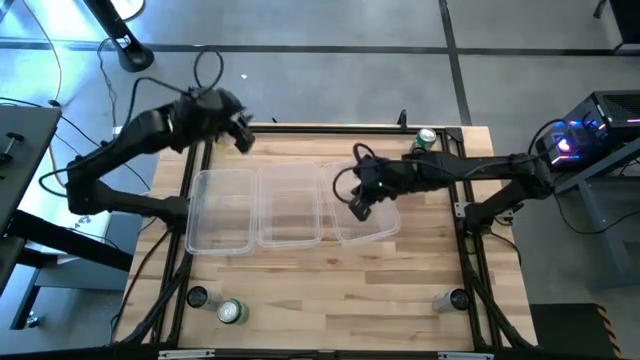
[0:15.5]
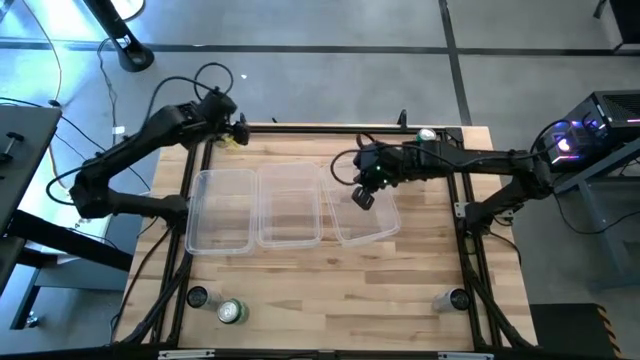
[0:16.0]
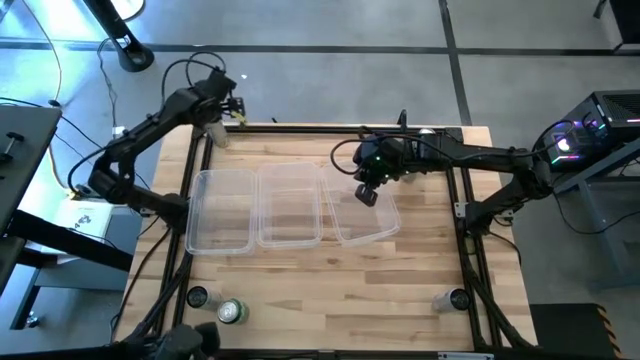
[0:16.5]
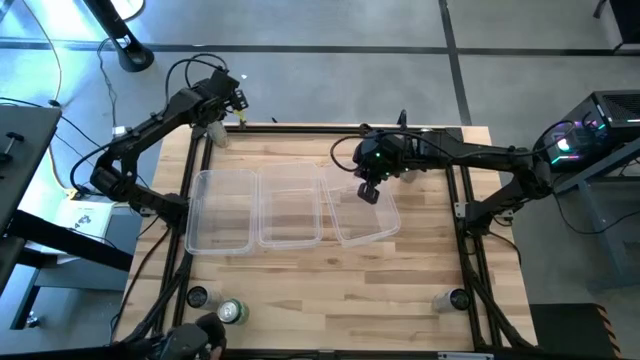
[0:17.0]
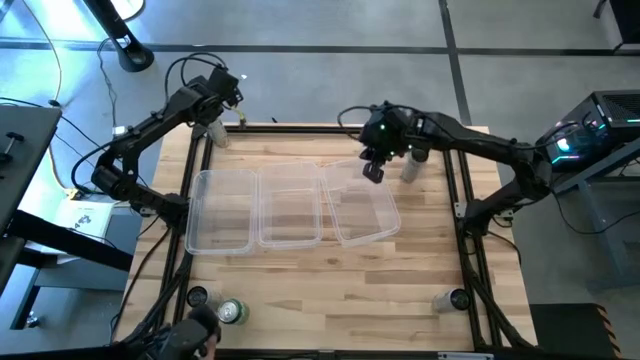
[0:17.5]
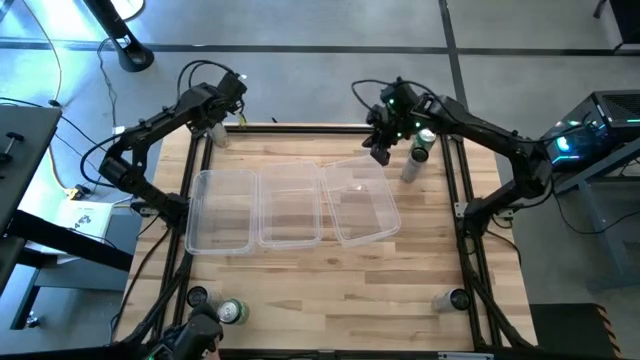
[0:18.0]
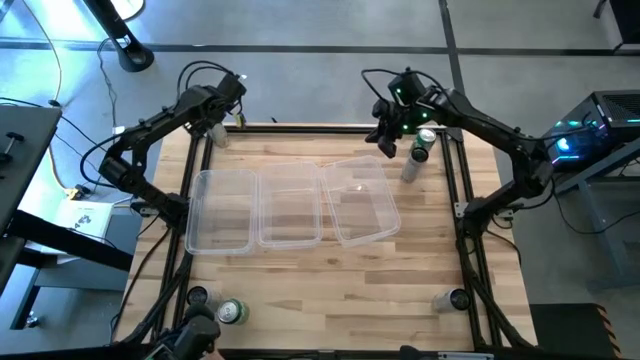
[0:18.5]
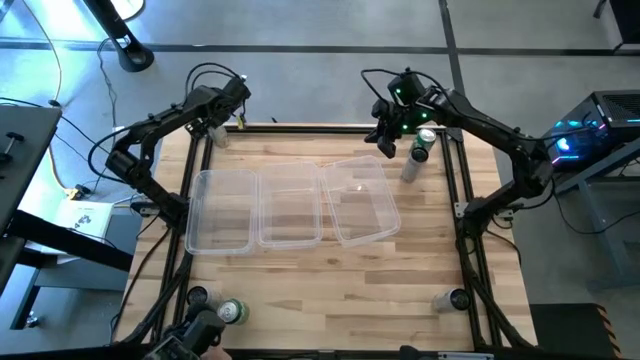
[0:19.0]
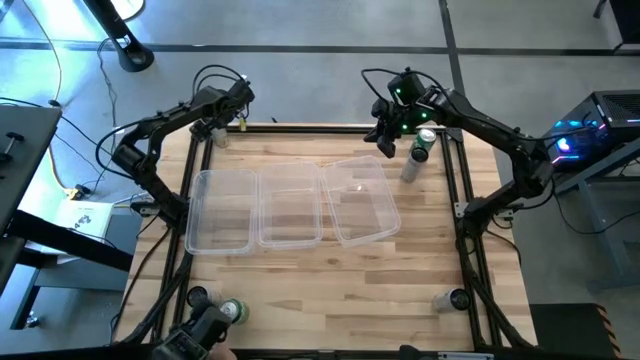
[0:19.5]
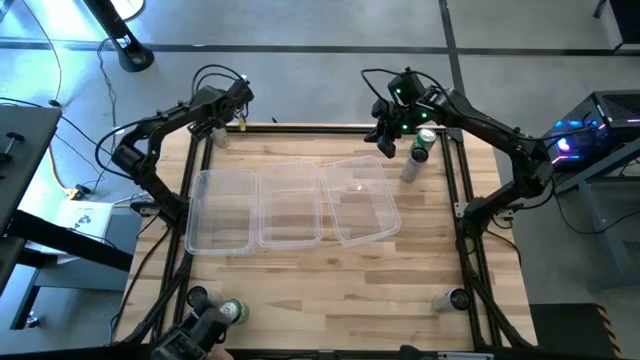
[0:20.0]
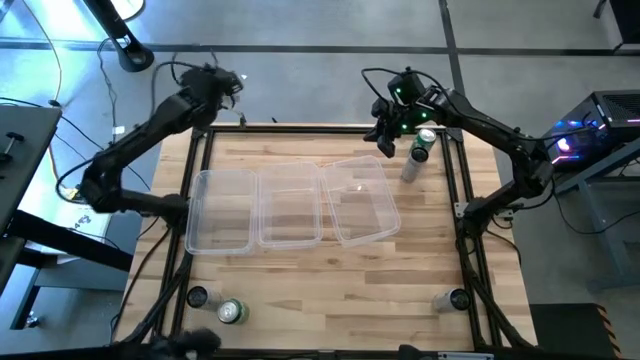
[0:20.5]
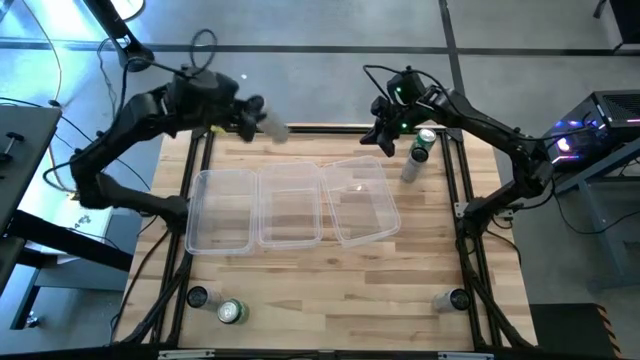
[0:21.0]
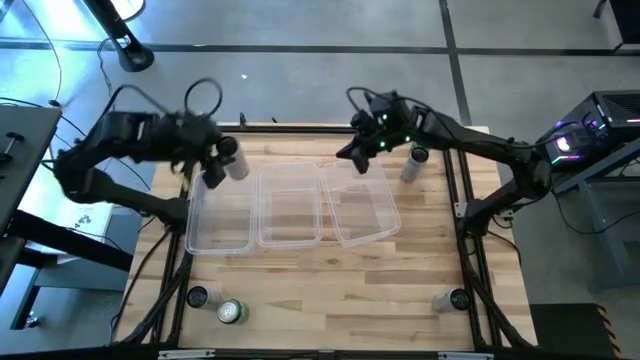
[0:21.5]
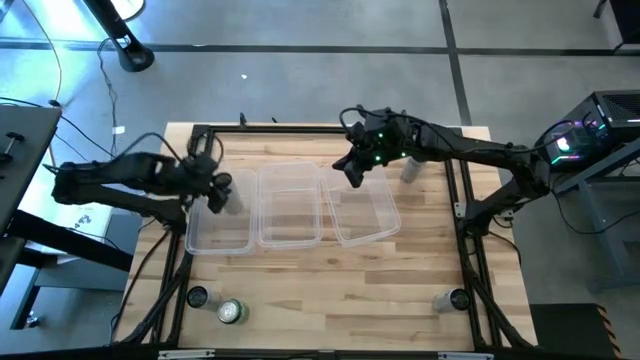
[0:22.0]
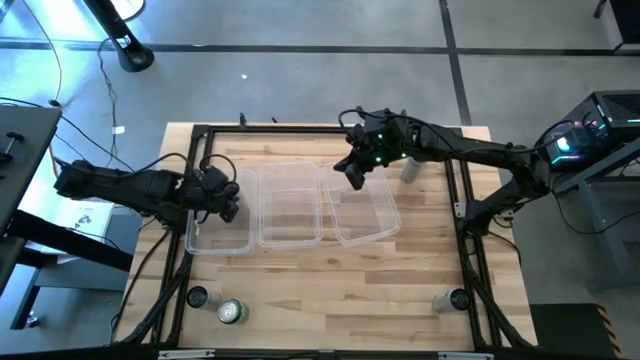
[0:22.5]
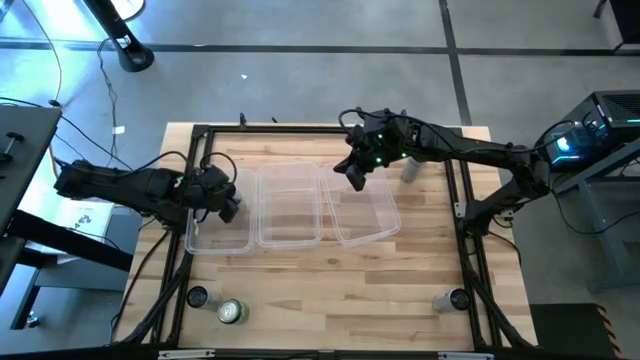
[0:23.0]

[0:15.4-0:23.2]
Task: Sort soda cans
Put the white-yellow can into the left transparent container

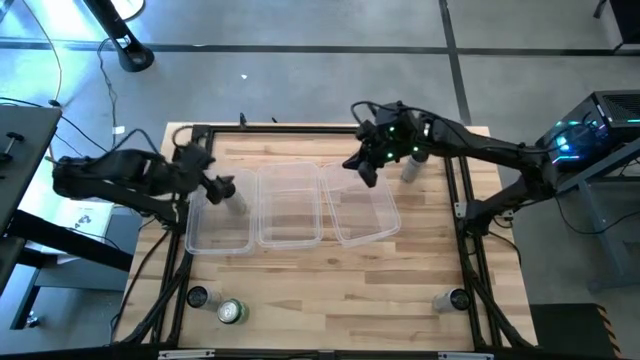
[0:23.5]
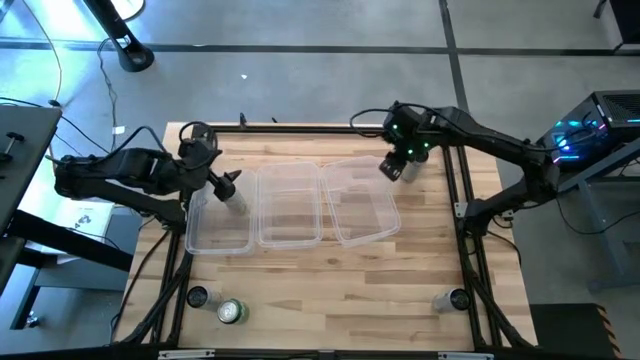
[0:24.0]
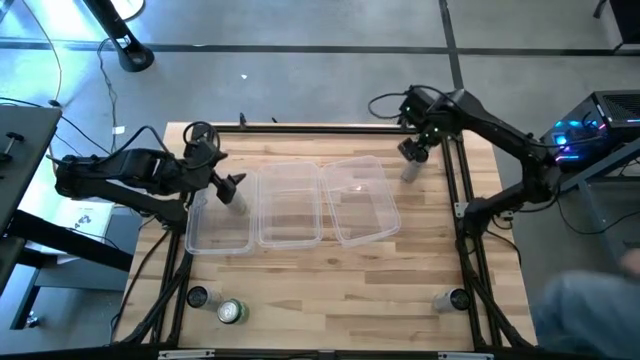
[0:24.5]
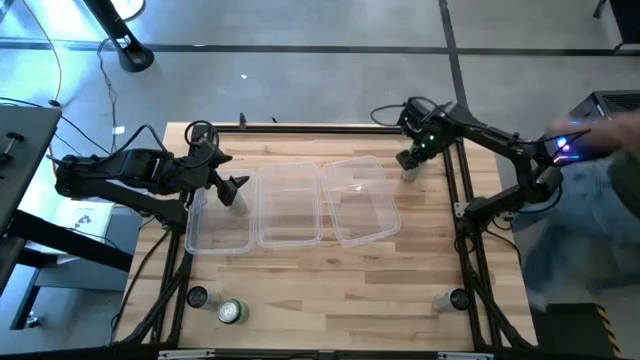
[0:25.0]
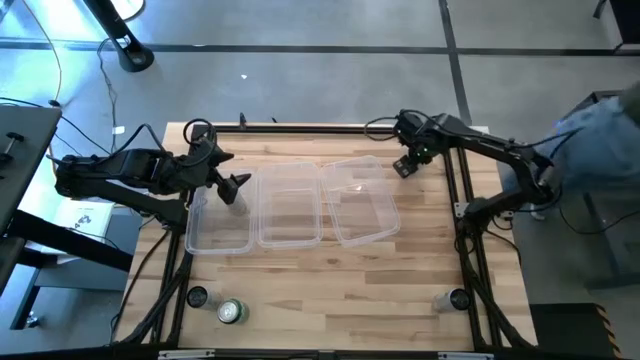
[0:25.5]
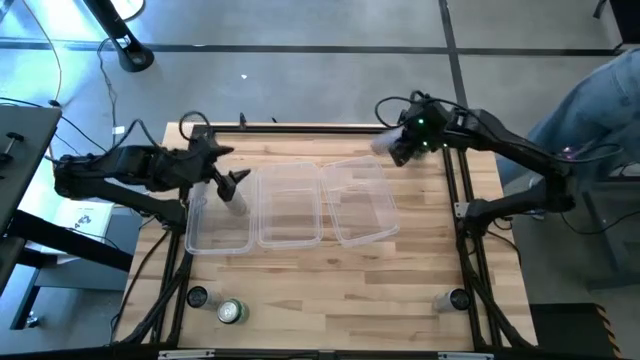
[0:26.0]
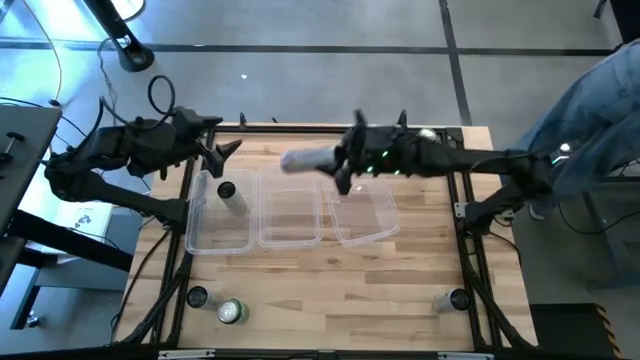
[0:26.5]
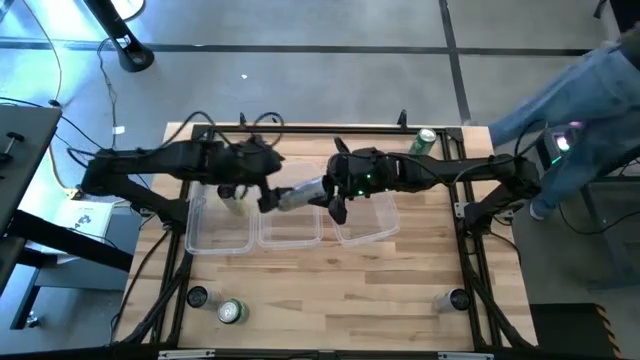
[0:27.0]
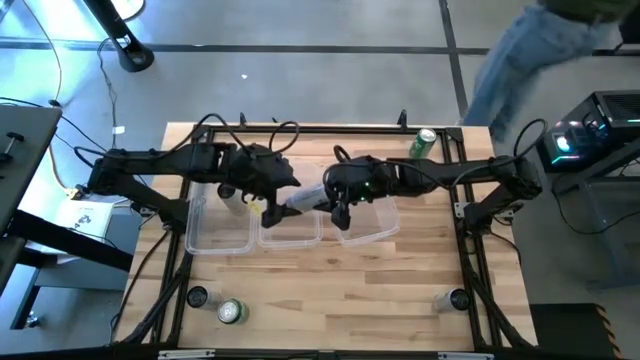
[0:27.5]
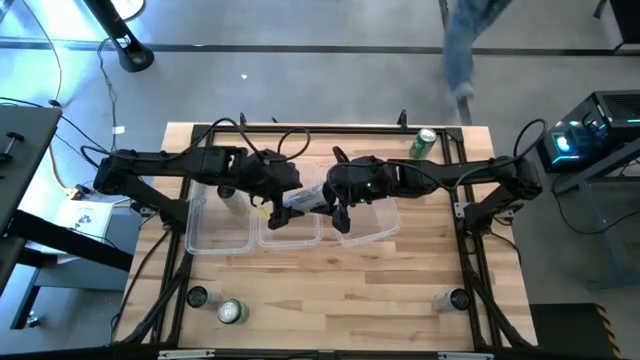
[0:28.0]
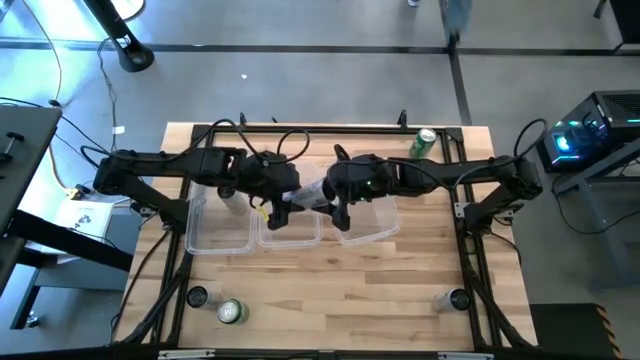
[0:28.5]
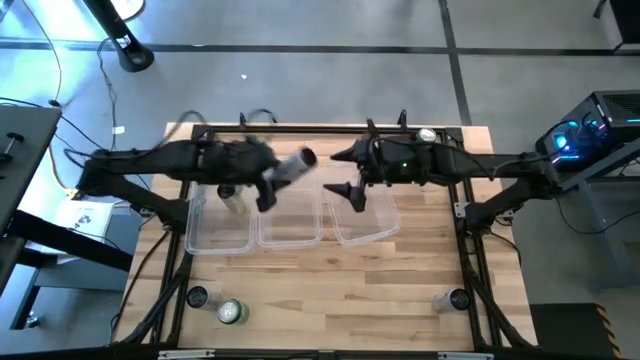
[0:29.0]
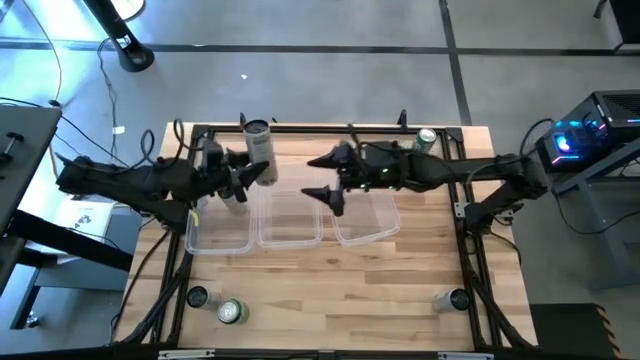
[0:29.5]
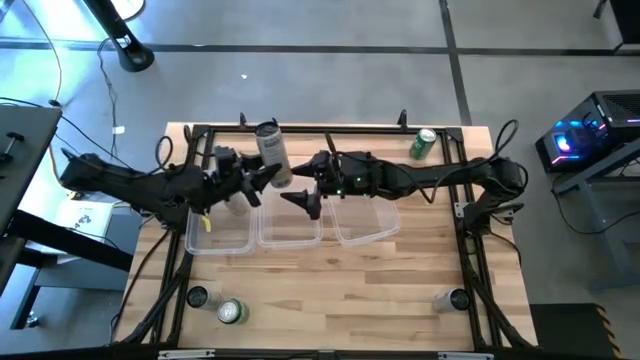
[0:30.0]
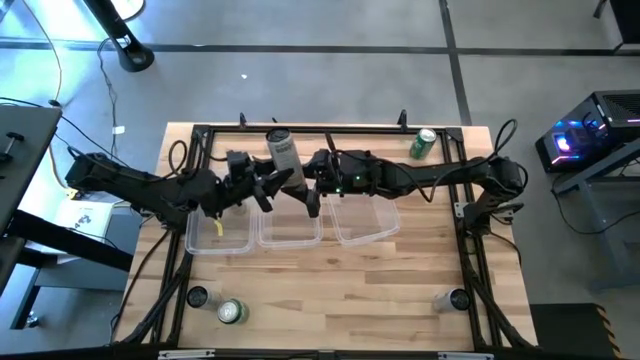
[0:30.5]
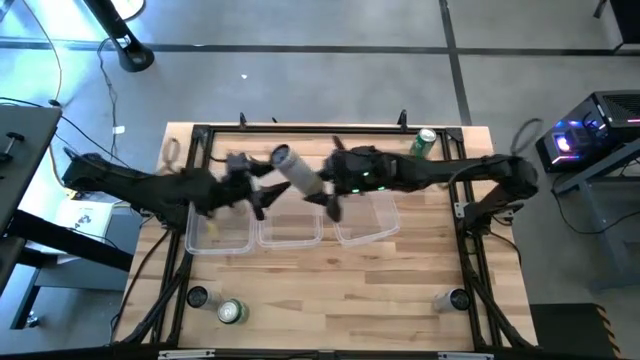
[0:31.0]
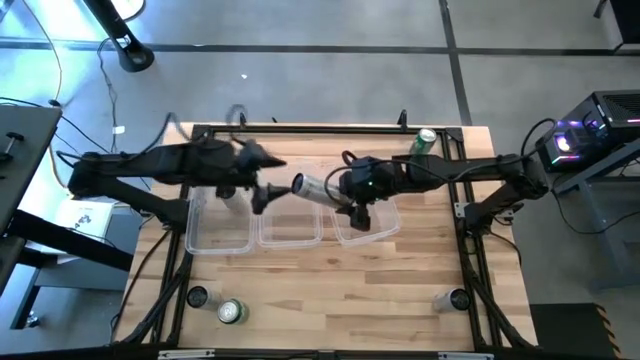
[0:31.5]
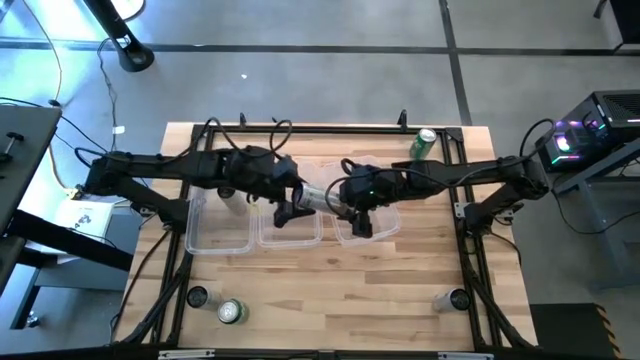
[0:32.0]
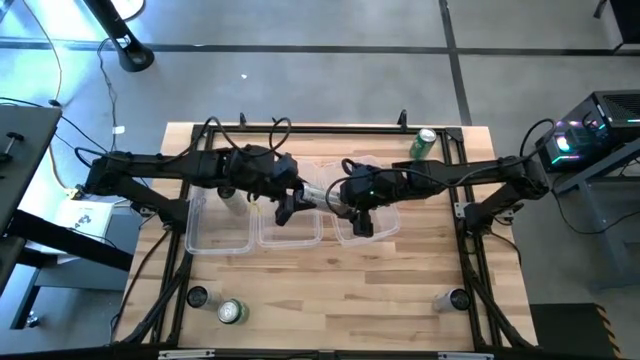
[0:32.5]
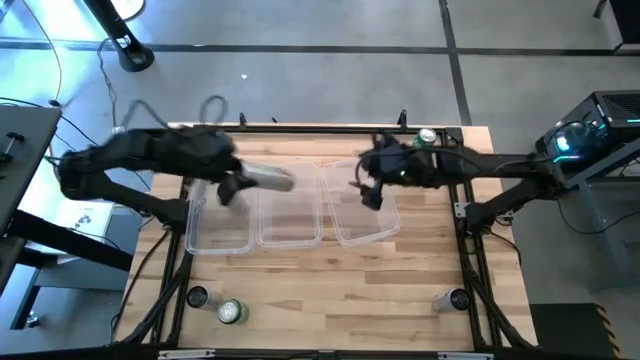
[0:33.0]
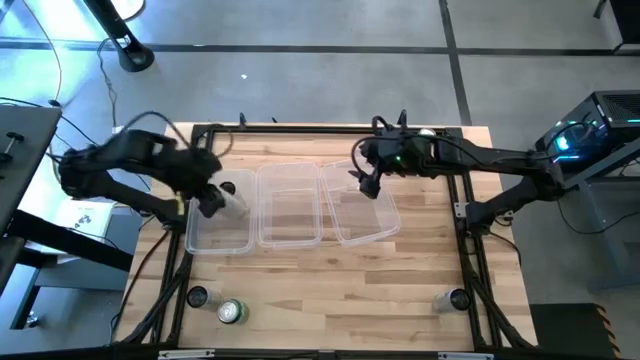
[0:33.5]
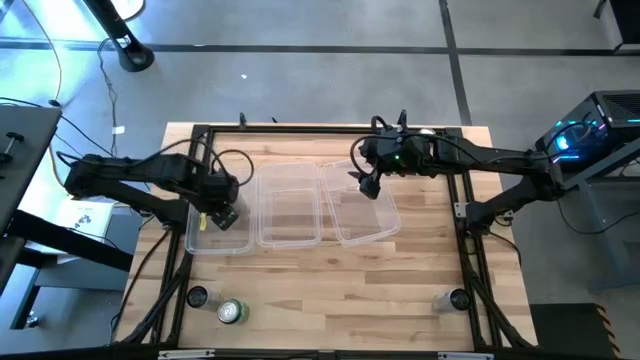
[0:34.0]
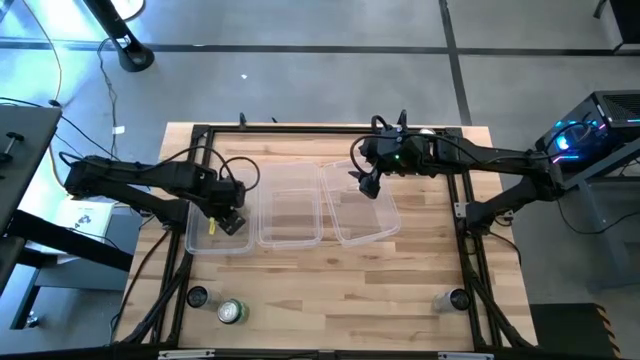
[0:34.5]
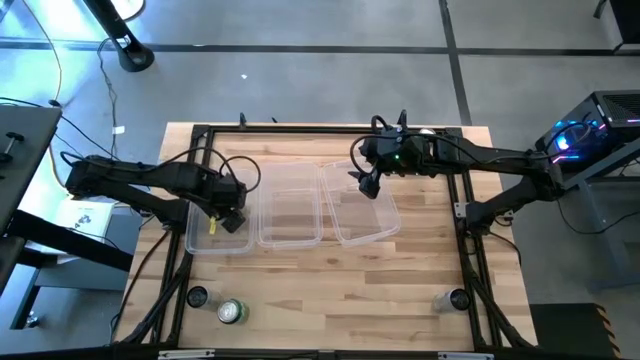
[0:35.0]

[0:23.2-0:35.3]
Put the white-yellow soda can into the left transparent container

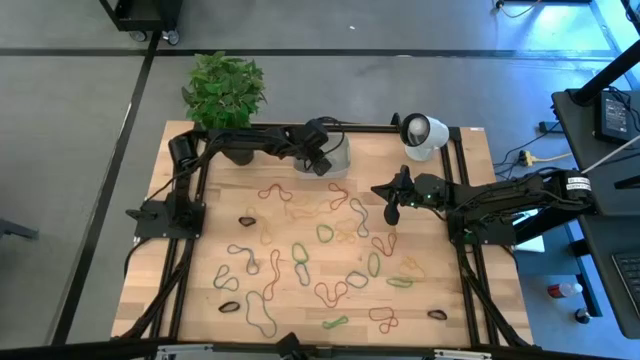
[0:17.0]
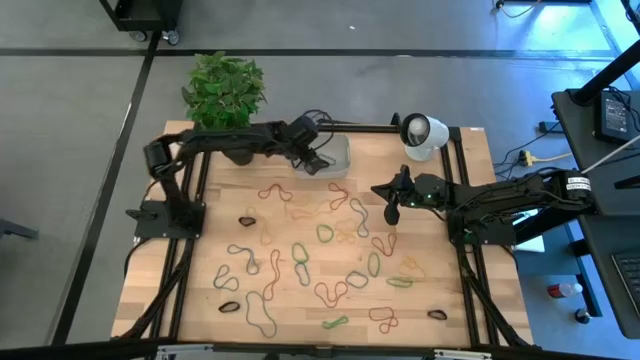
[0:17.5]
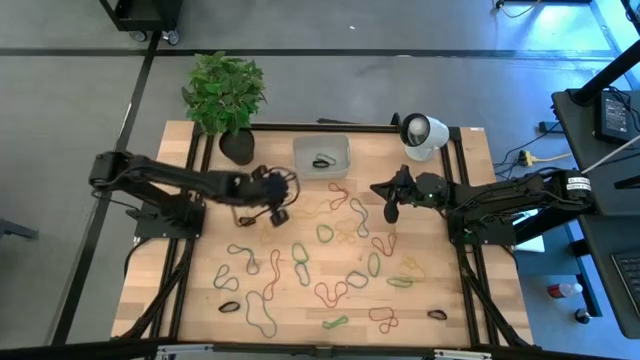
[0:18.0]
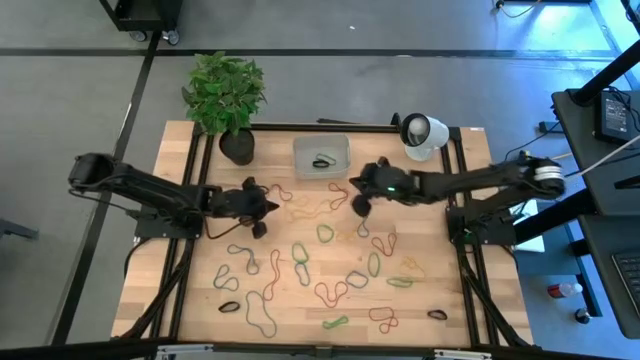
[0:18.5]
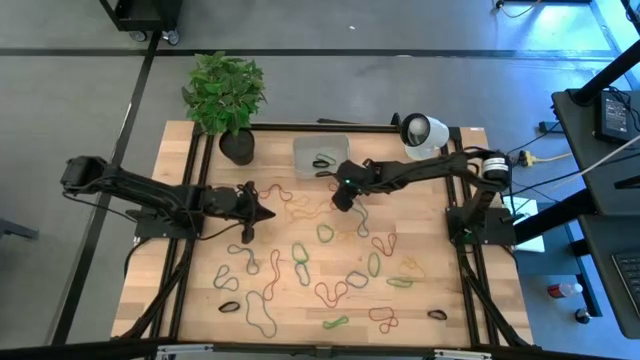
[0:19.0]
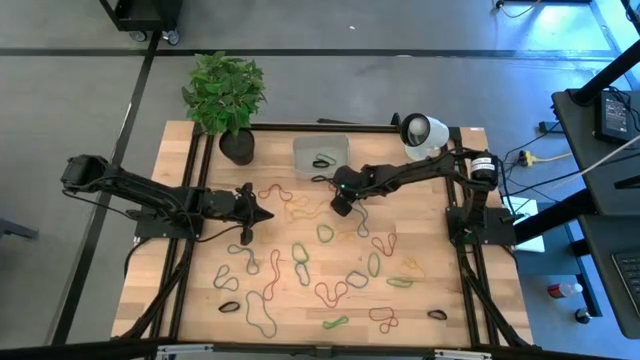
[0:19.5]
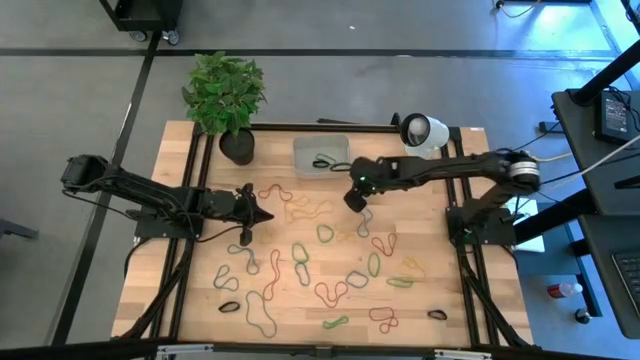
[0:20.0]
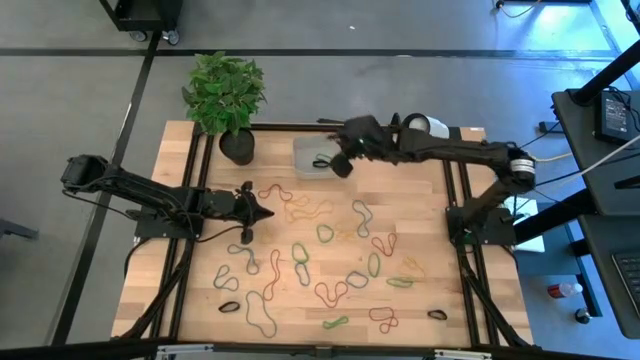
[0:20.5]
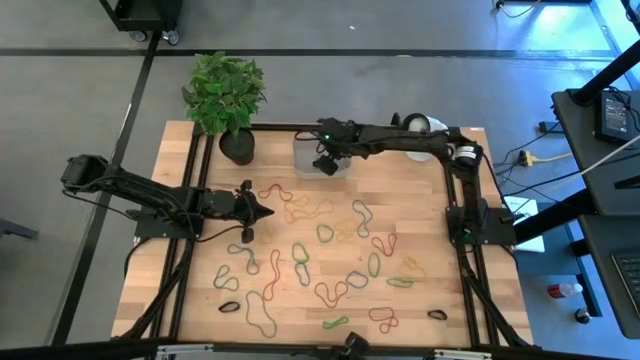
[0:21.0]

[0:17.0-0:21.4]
Task: Pick and place rubber bands into bin
Put the red rubber band into the gray bin
